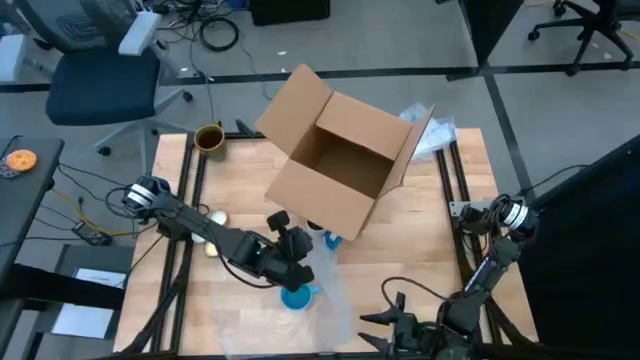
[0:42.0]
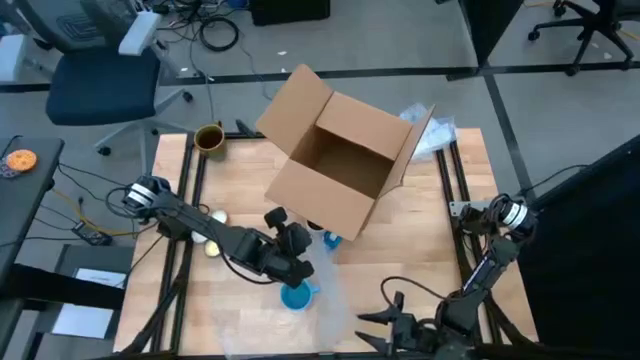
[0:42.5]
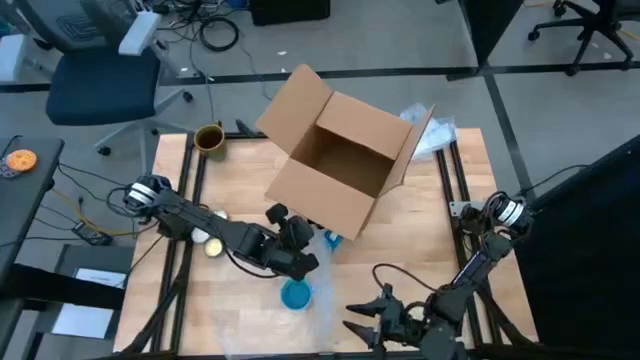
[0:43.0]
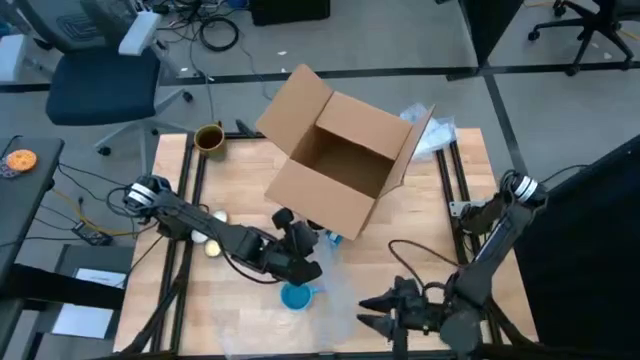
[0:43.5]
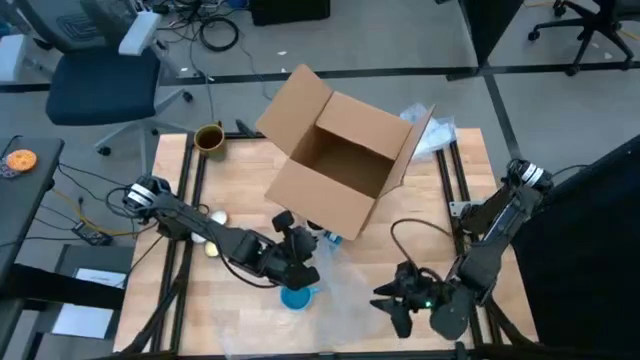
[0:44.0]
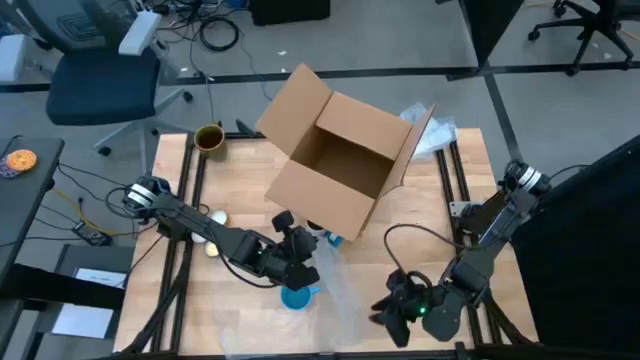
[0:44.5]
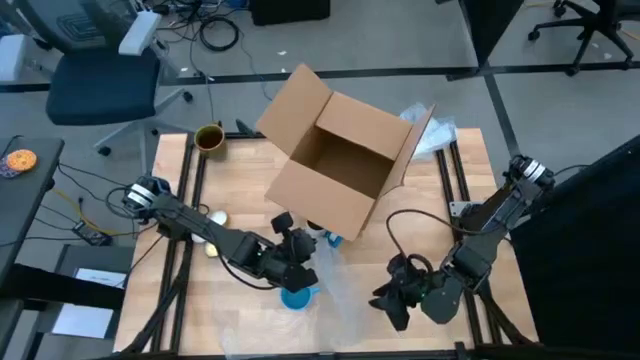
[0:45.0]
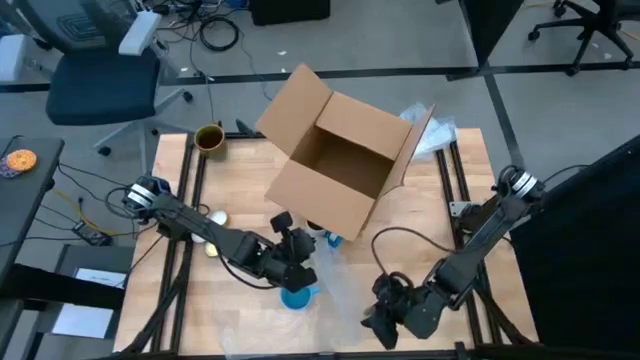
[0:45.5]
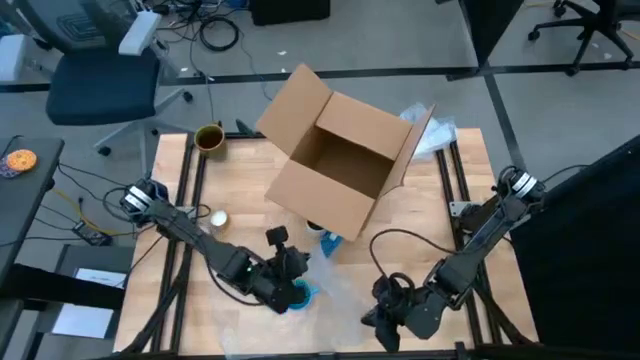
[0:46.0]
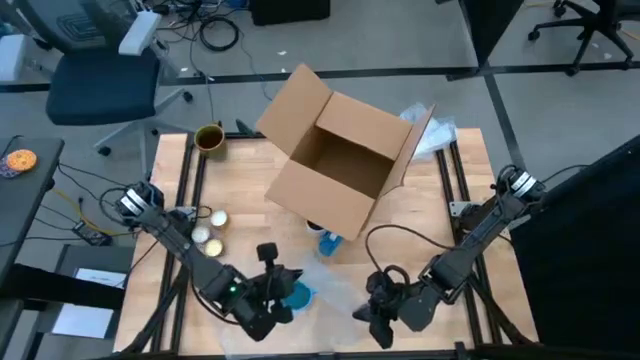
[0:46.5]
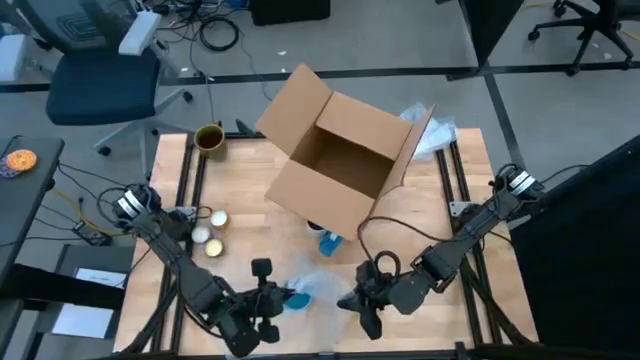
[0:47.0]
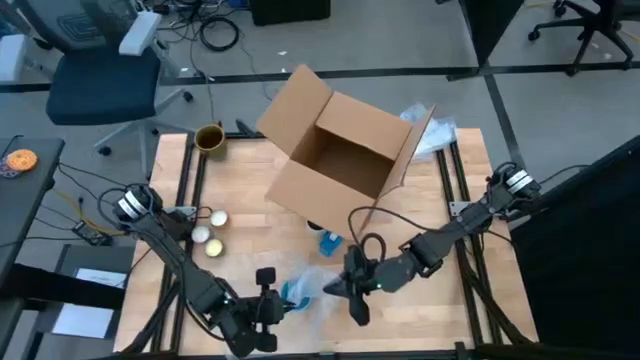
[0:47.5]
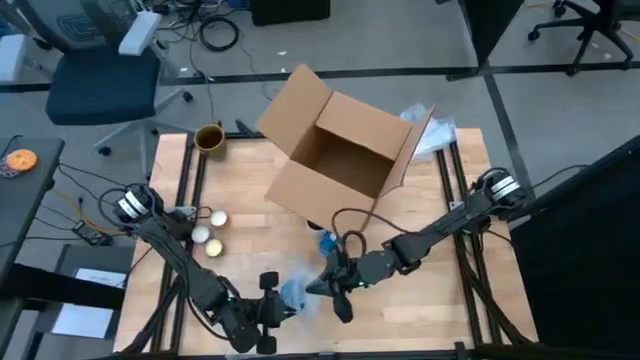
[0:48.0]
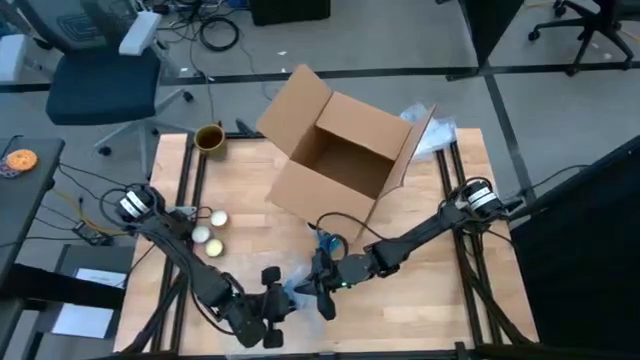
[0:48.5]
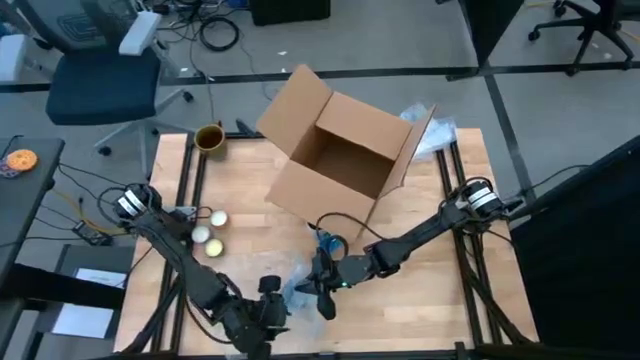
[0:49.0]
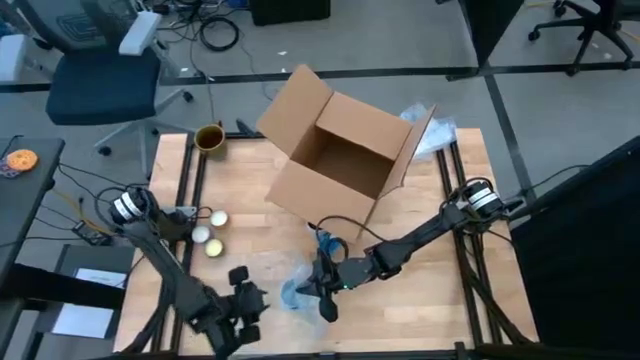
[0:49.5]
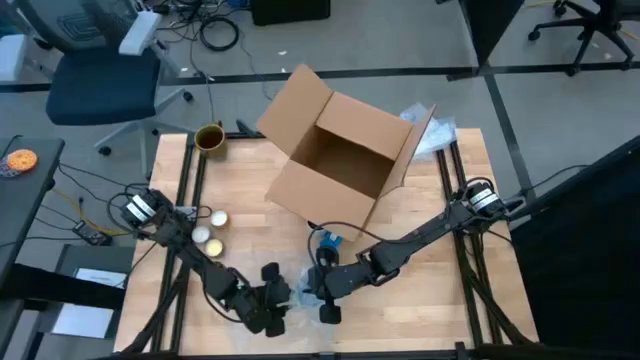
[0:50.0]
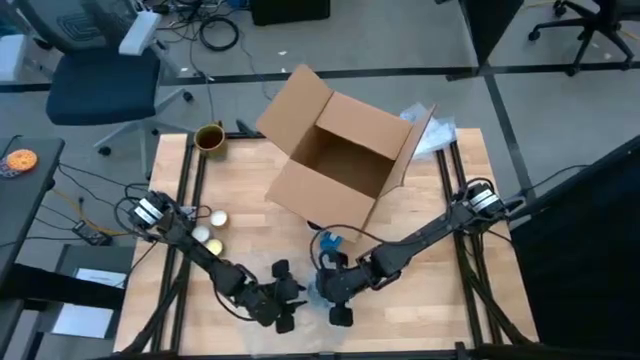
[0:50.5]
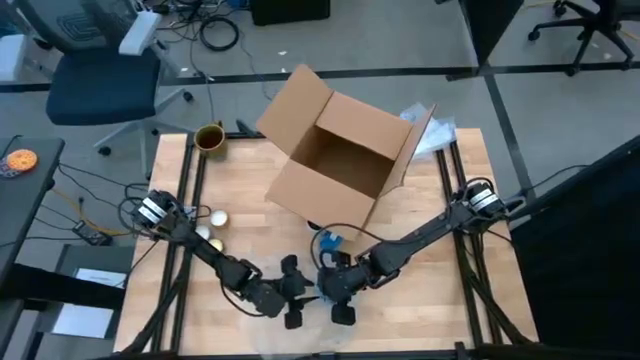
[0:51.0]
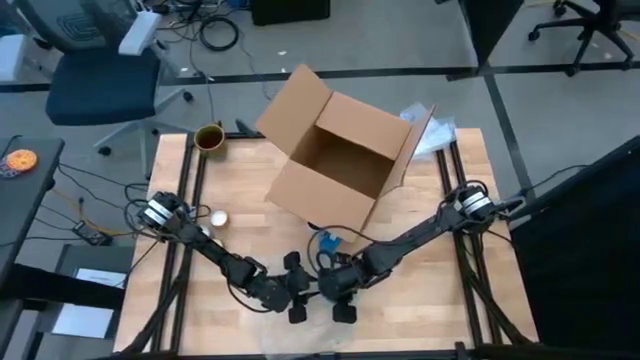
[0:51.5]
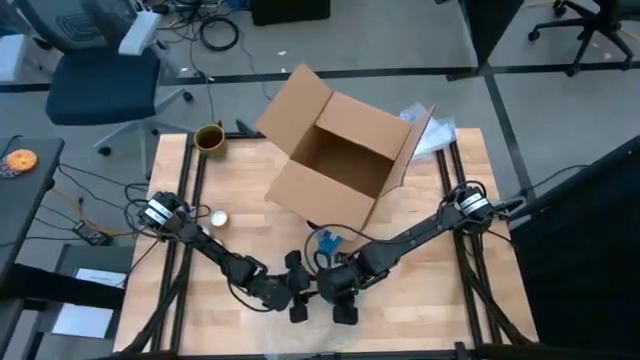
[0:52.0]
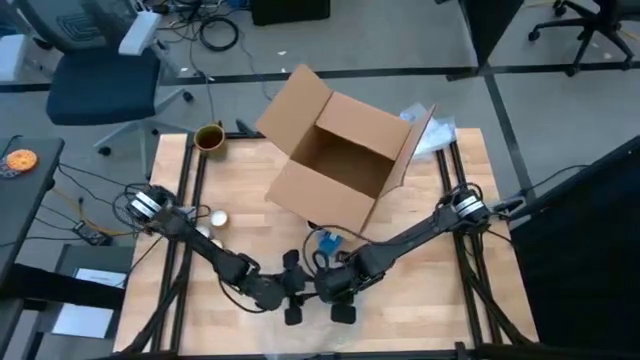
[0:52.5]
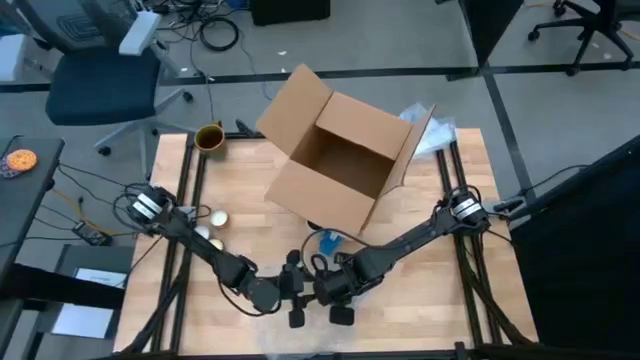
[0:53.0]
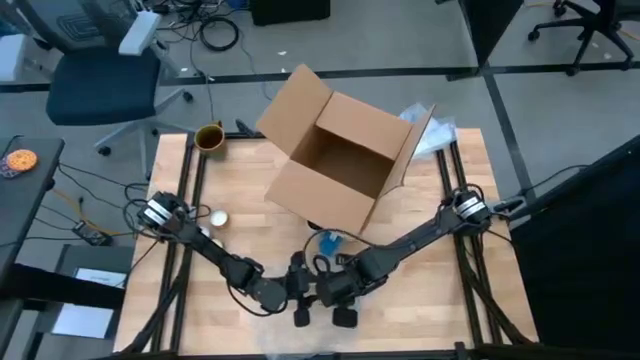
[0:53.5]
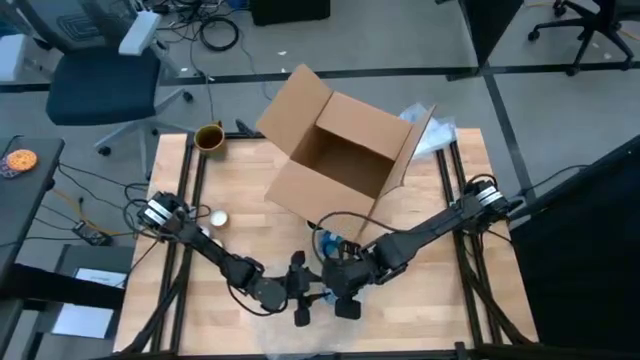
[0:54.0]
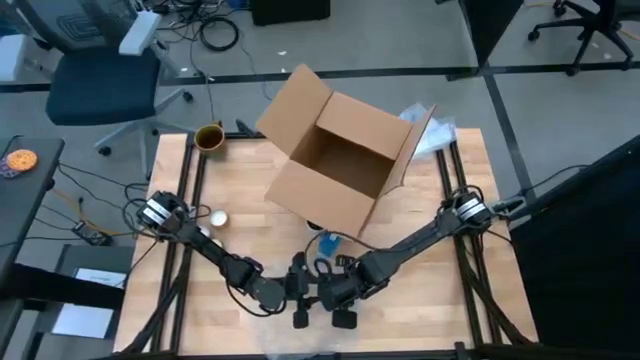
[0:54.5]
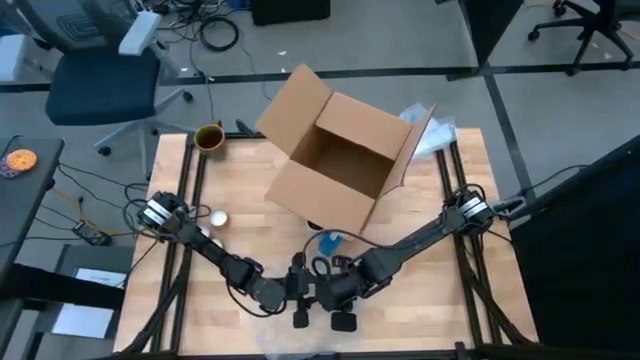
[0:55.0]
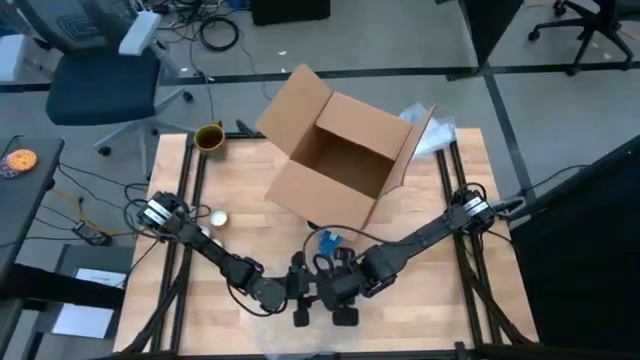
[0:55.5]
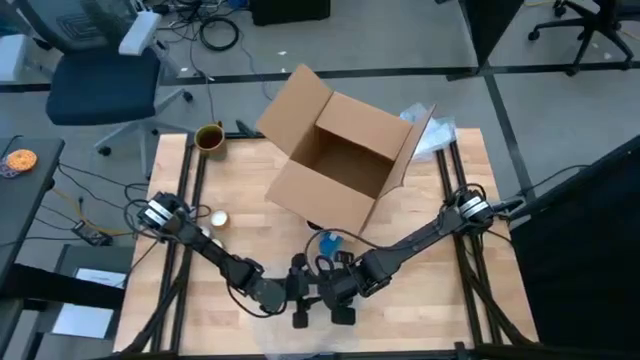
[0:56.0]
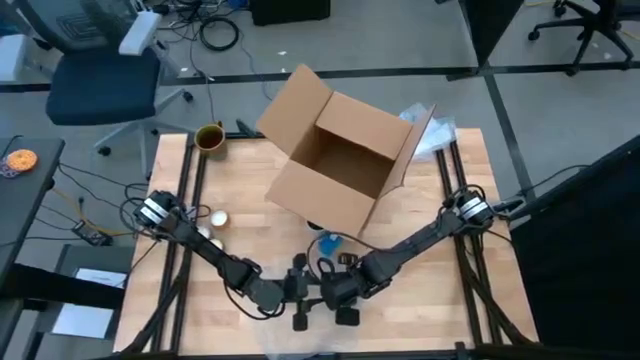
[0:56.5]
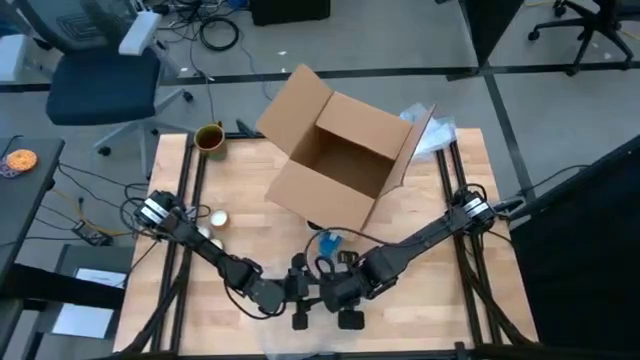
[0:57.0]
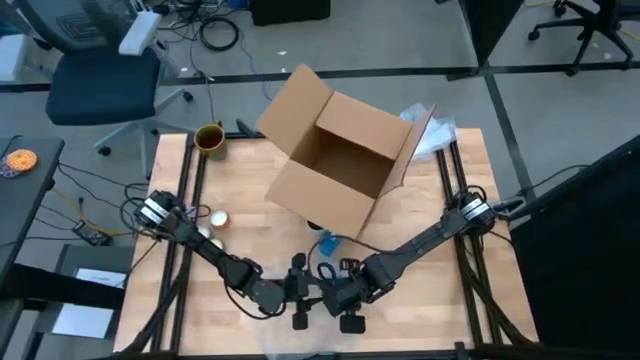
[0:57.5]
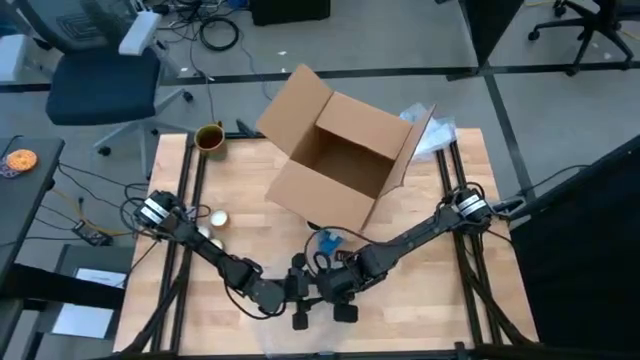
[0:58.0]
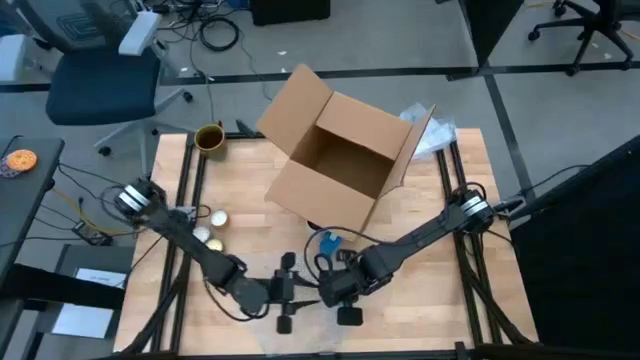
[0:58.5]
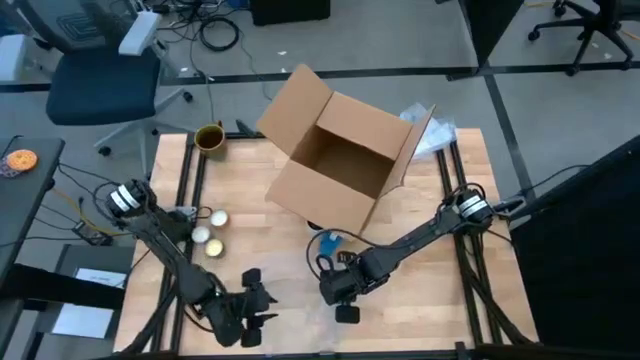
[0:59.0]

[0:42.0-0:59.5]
Task: wrap mug
Wrap the blue mug with the bubble wrap on the table
